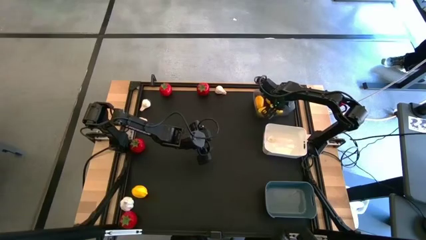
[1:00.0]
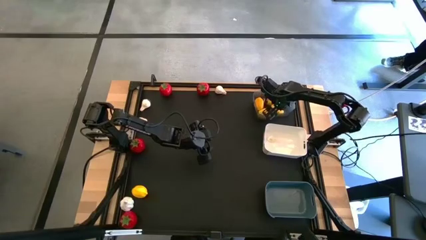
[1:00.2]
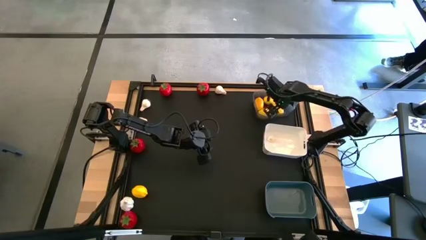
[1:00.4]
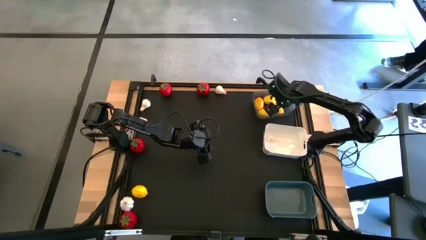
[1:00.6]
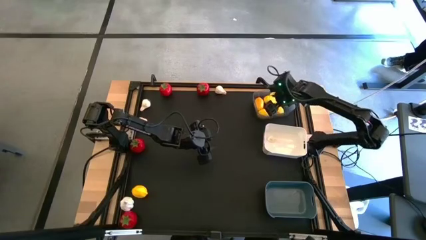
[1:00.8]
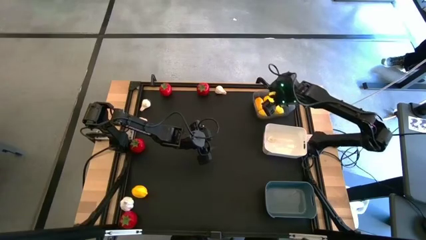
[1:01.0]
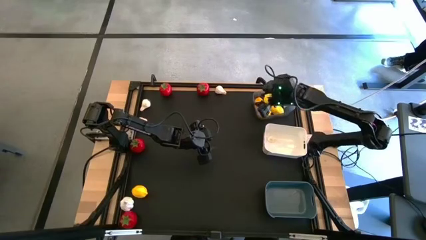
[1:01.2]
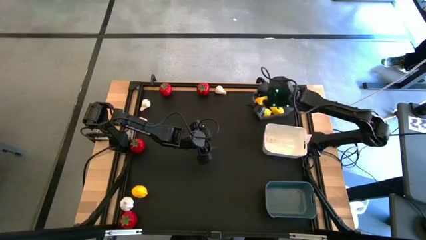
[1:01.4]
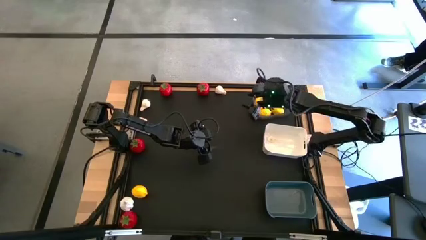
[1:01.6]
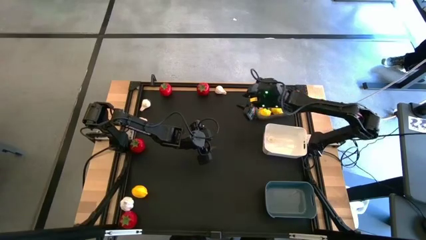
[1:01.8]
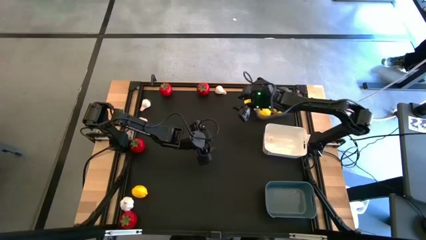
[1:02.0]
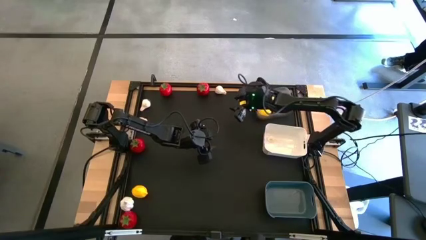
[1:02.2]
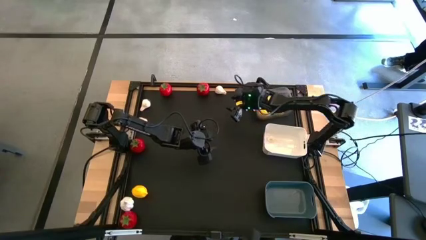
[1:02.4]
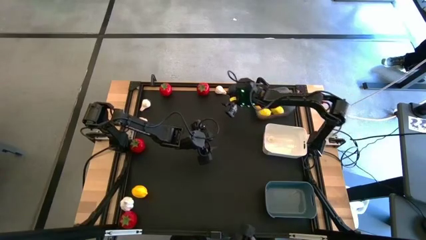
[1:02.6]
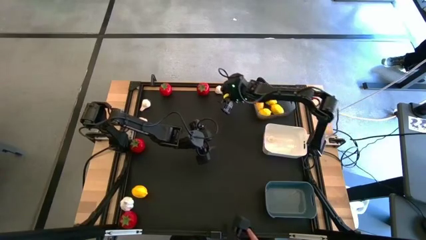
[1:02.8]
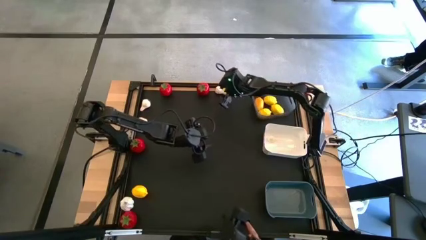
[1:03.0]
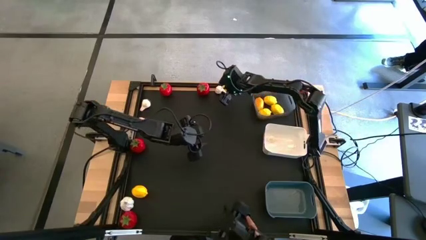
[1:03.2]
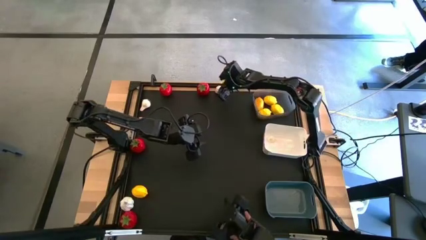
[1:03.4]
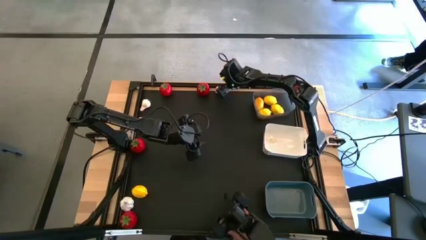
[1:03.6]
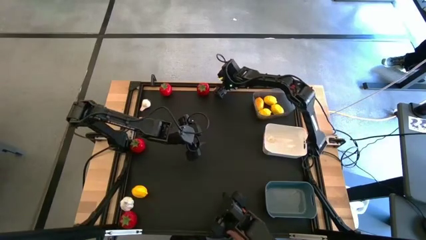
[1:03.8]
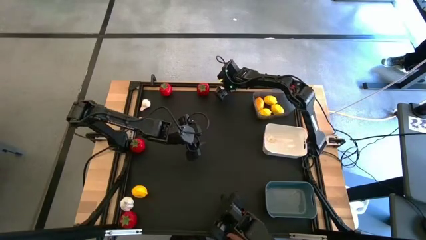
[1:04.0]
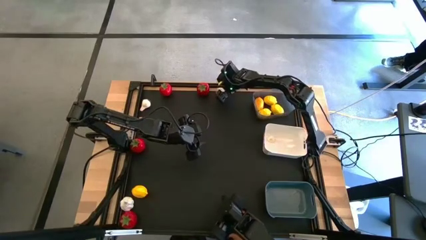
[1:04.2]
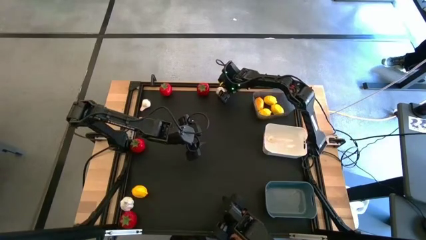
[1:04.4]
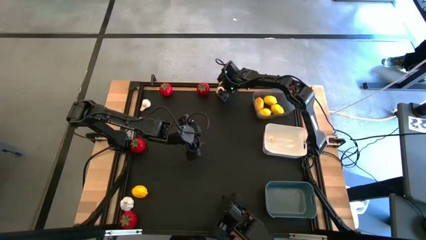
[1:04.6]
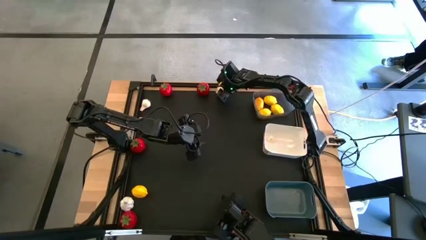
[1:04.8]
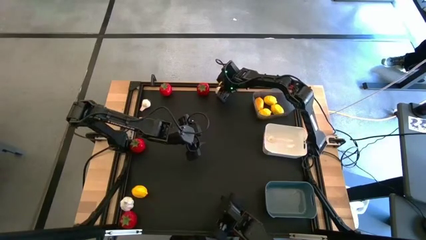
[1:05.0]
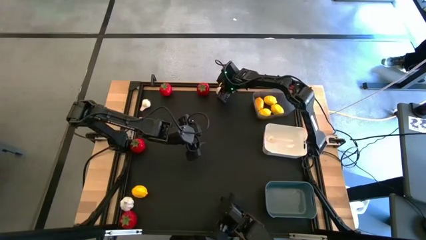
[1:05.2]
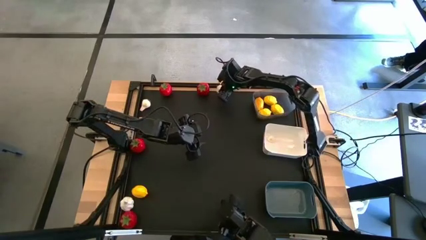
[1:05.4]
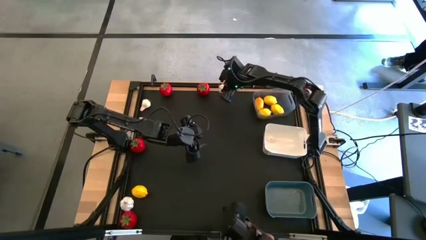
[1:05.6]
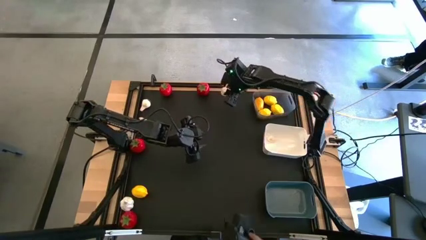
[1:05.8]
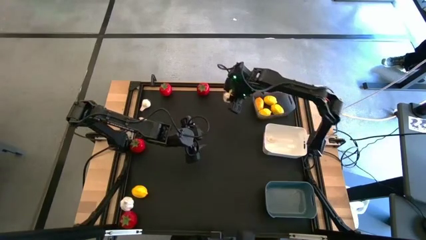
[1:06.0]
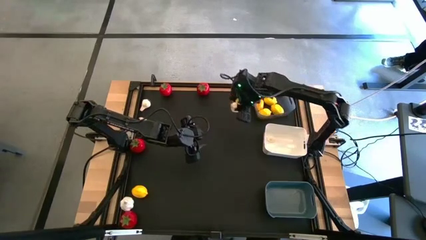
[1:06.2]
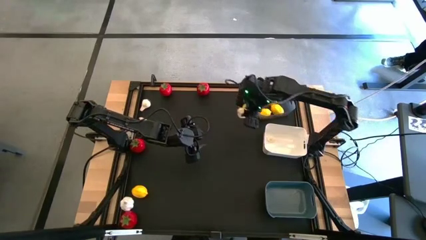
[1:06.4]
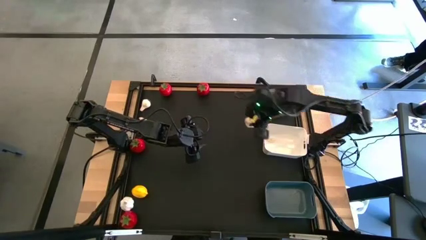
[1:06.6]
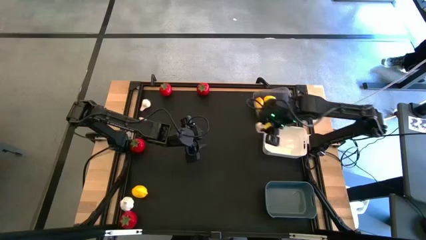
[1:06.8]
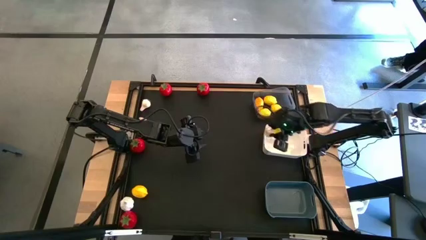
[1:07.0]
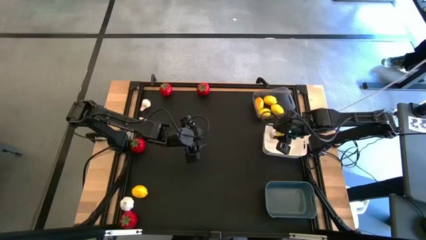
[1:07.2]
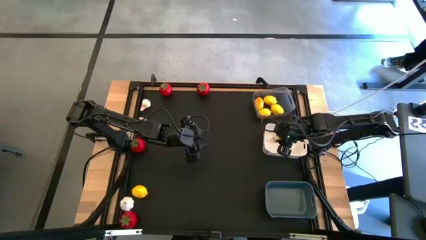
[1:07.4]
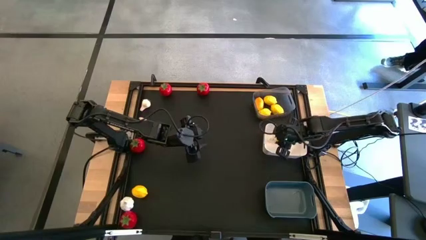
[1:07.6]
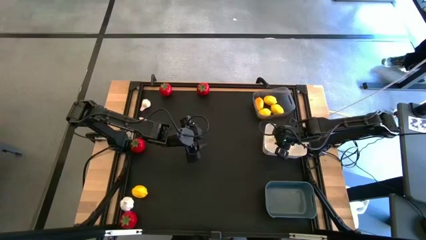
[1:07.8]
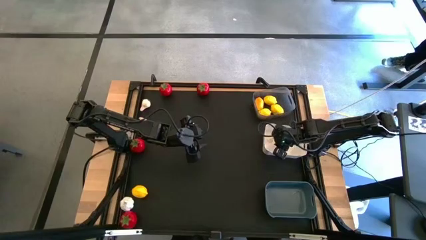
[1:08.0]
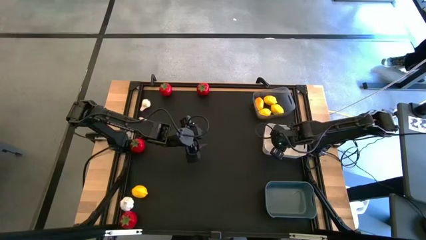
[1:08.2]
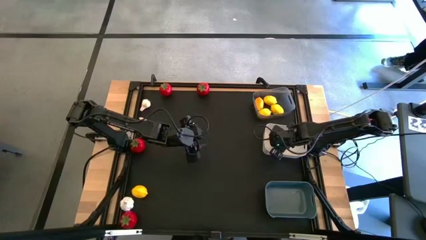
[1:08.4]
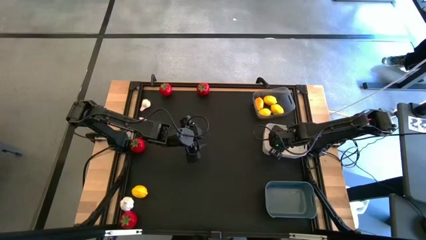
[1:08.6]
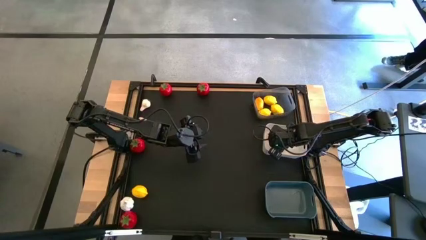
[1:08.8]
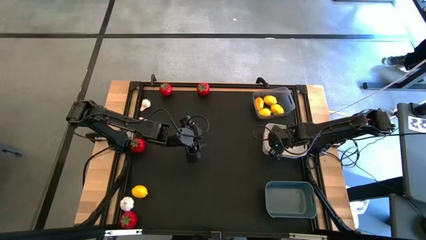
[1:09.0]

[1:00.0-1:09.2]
Task: Sort produce into baskets
Put the garlic into the white bin

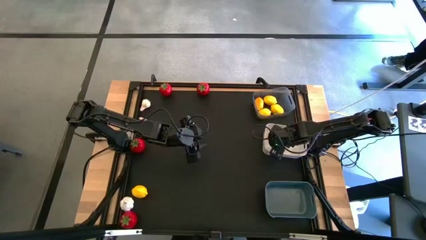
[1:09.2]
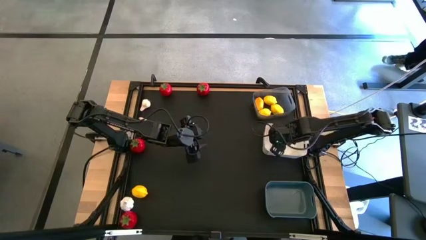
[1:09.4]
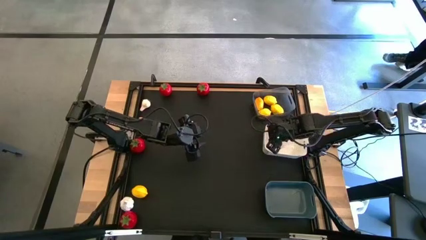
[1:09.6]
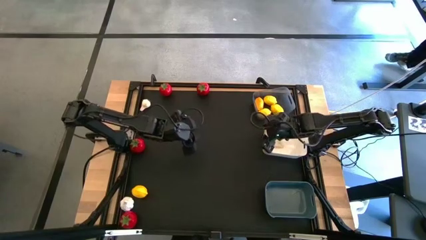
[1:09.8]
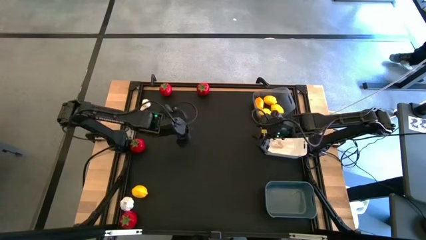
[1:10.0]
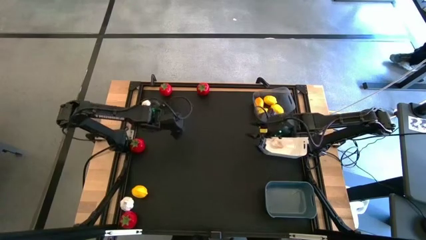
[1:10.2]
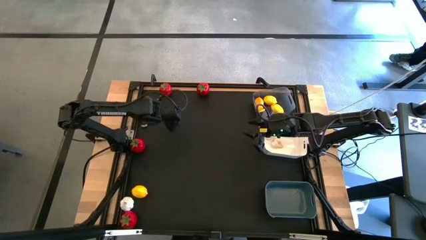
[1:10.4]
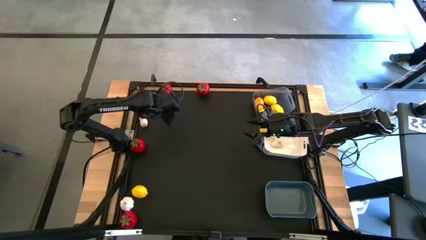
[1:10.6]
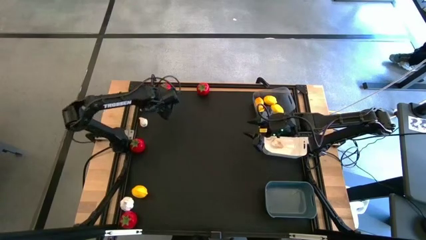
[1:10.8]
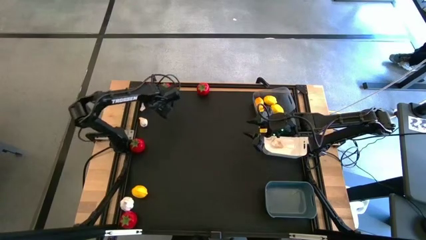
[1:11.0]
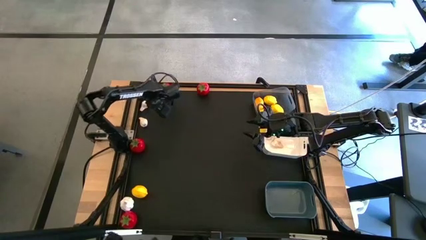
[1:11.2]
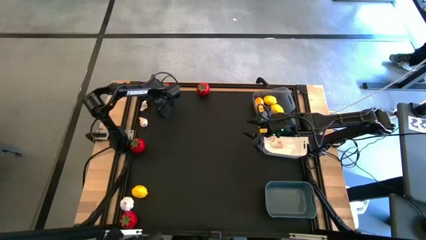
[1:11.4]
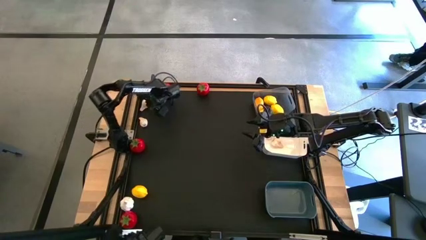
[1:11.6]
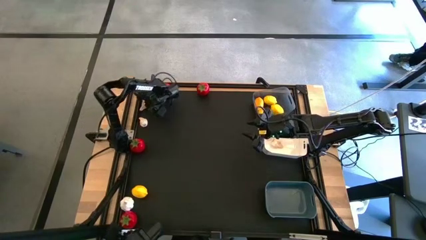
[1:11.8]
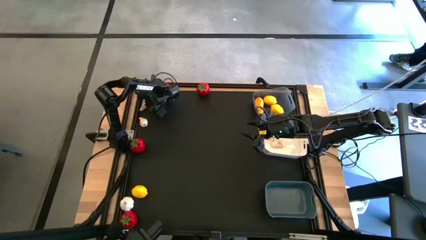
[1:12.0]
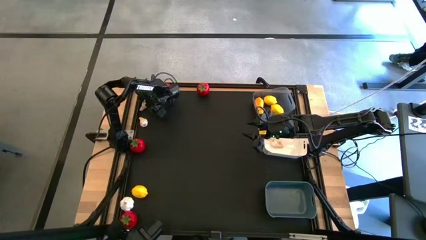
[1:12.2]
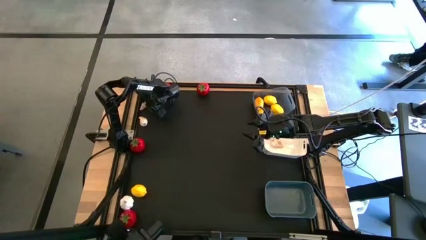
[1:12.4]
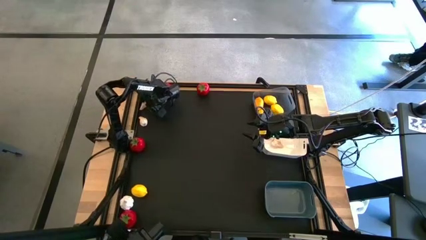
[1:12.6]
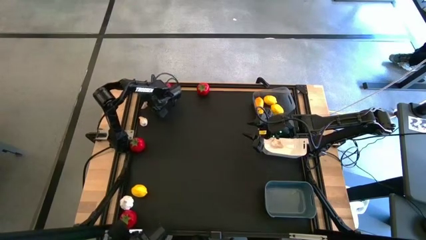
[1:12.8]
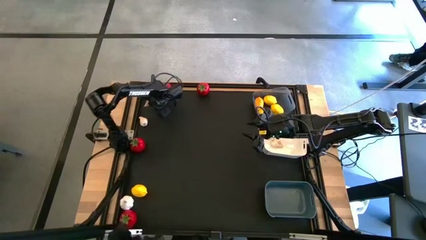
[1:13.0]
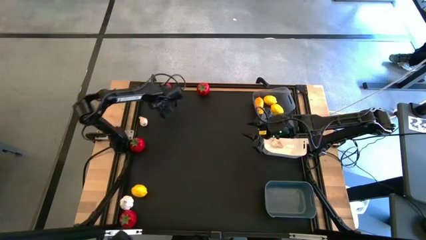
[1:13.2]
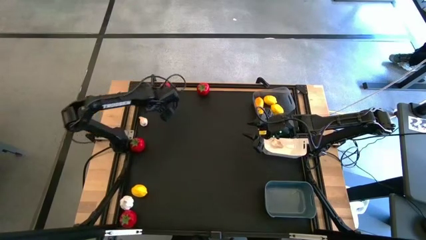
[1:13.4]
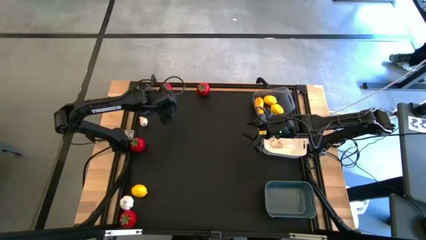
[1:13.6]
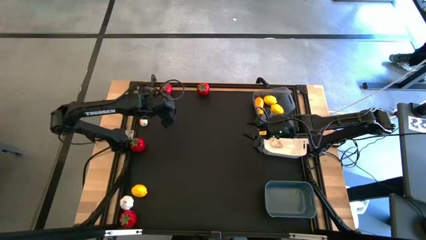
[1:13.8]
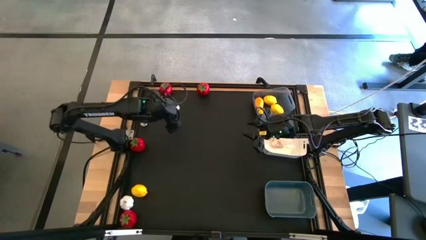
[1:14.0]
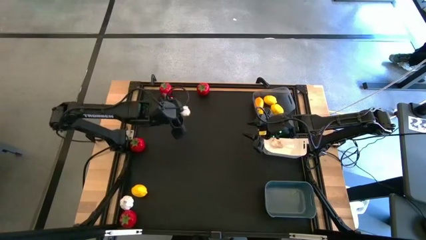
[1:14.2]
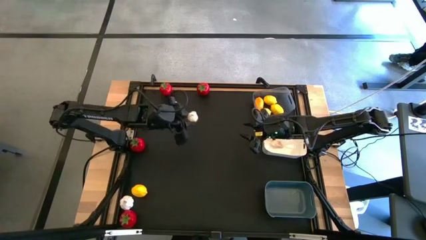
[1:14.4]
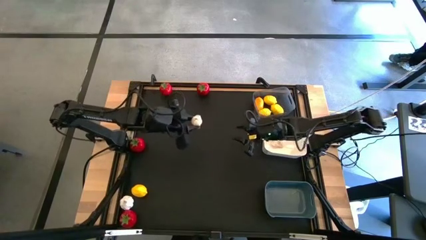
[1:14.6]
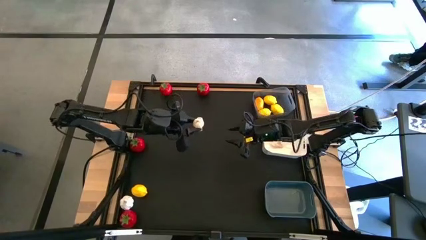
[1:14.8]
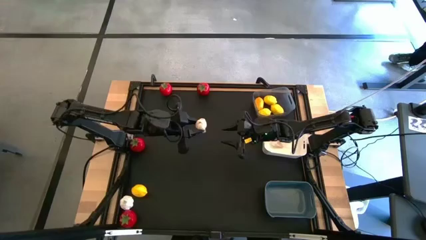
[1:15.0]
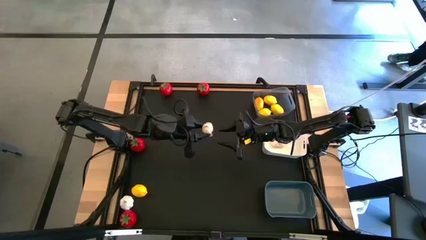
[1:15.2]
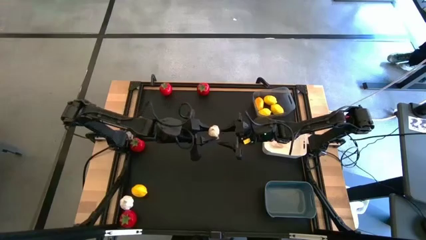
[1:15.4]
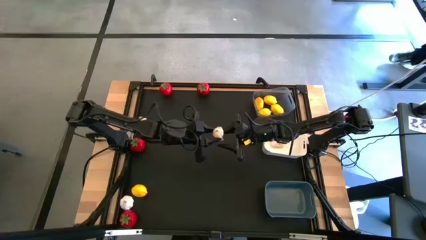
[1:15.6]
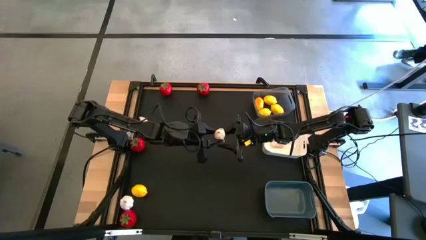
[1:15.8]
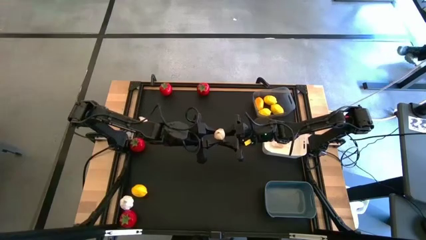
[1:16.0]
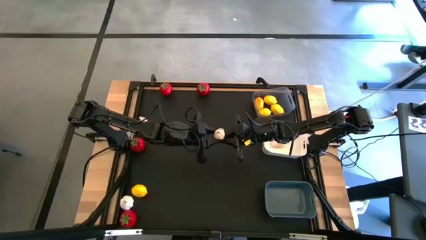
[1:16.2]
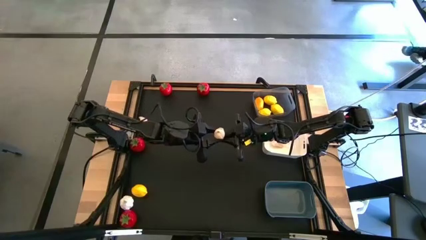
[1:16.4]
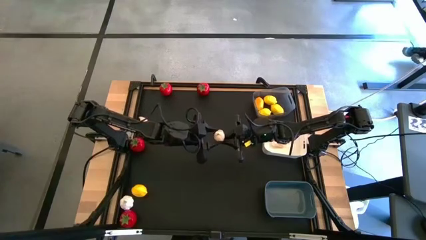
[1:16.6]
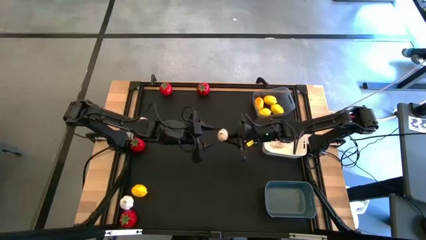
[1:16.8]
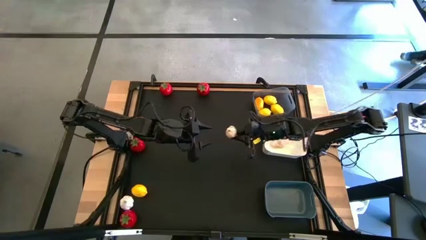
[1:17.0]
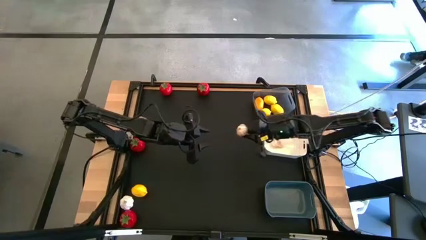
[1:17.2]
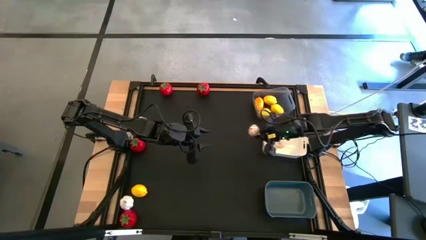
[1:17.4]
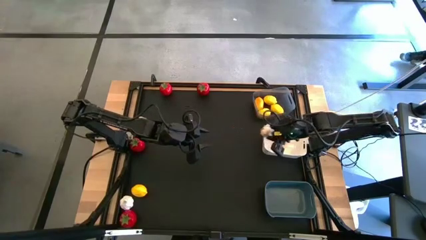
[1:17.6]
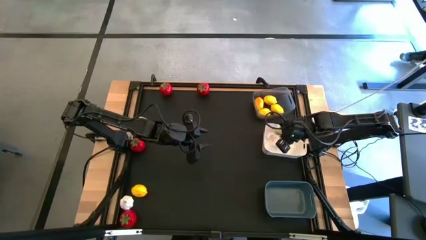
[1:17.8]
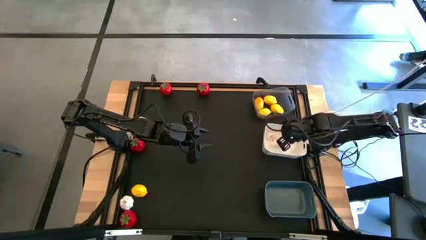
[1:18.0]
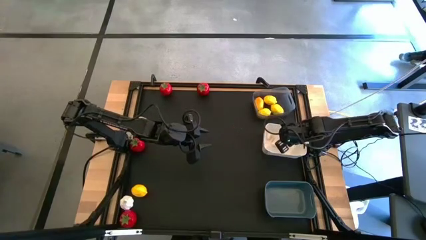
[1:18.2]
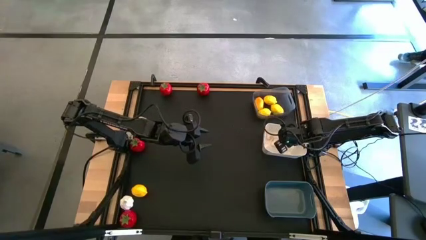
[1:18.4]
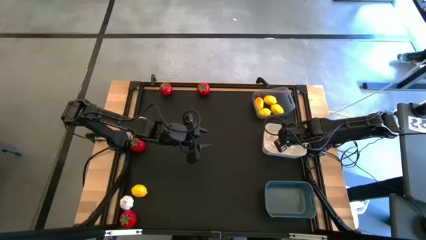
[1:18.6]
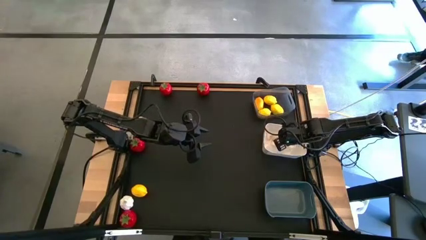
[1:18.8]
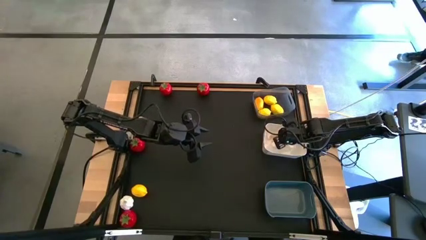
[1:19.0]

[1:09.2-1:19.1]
Put the garlic into the white bin
